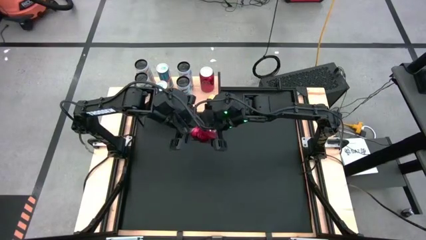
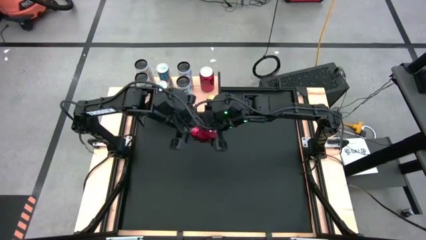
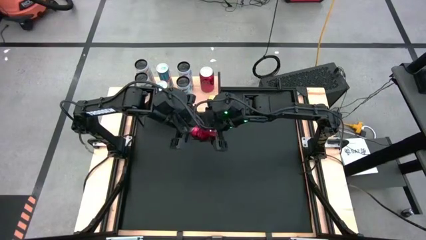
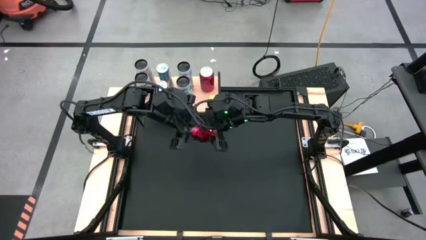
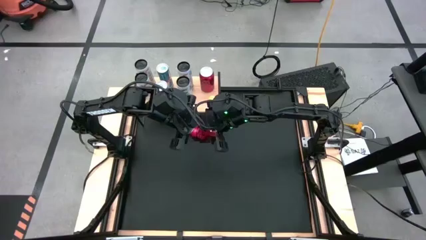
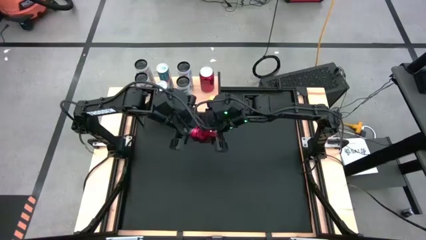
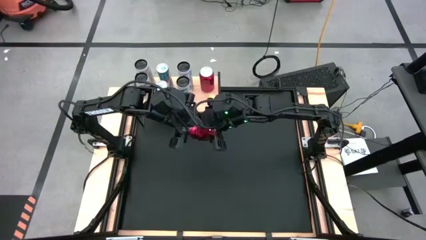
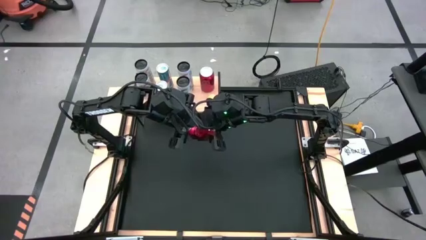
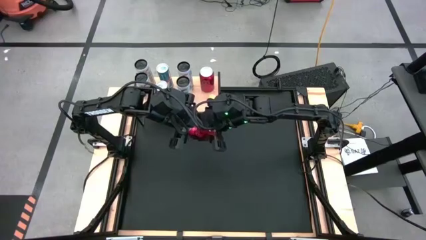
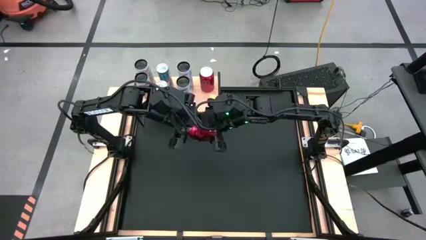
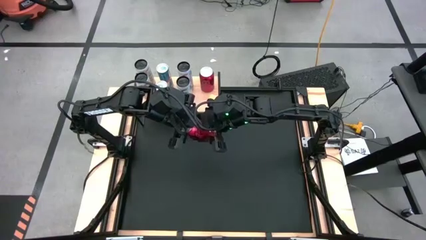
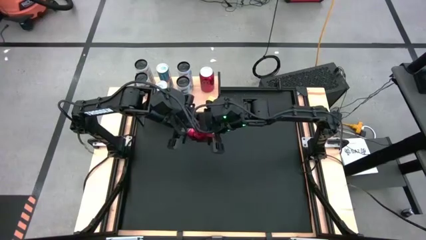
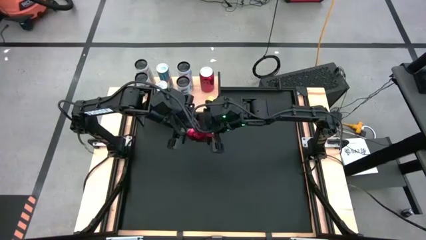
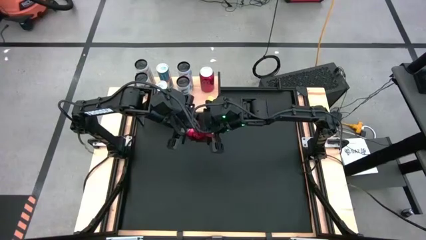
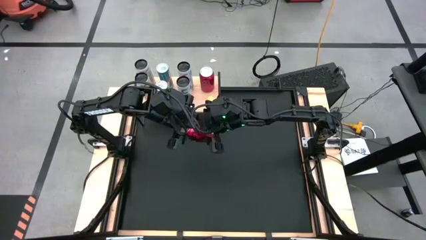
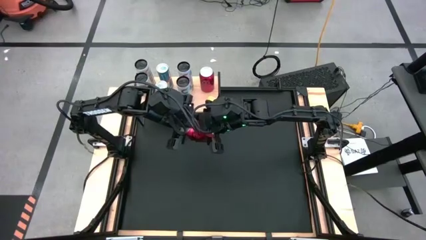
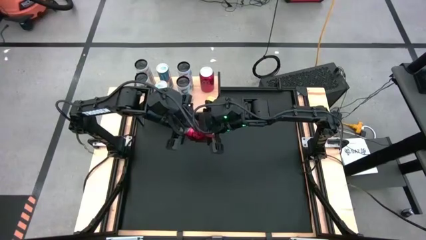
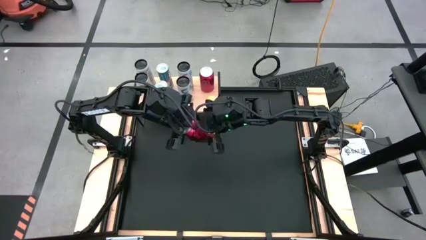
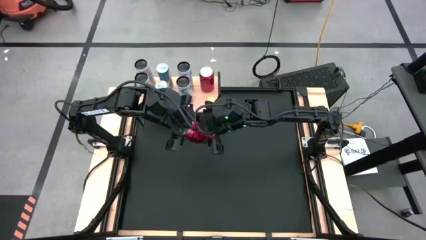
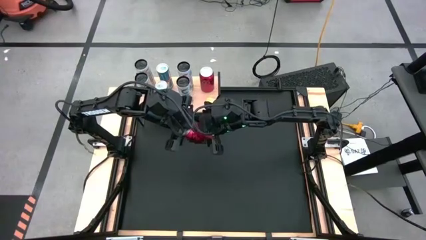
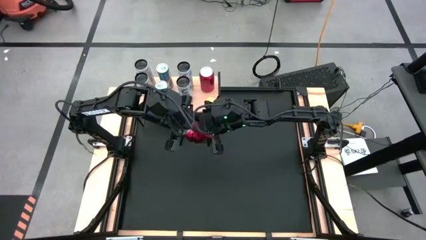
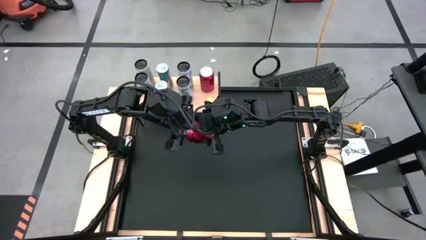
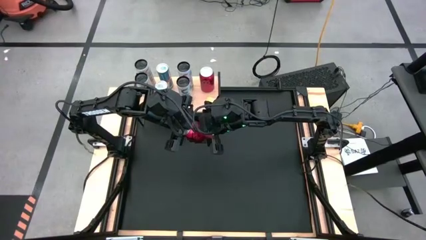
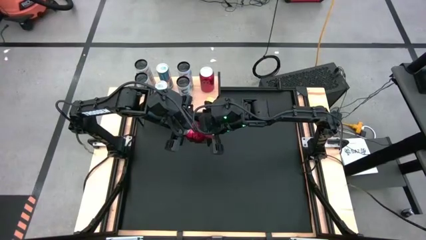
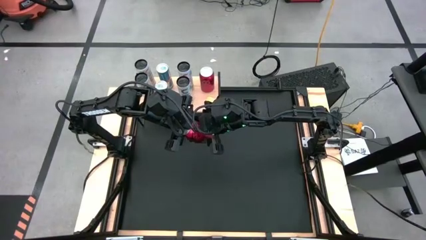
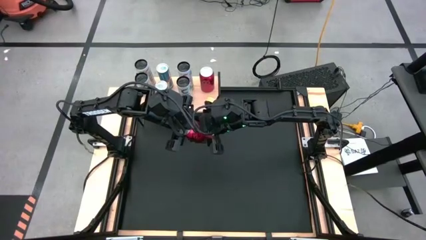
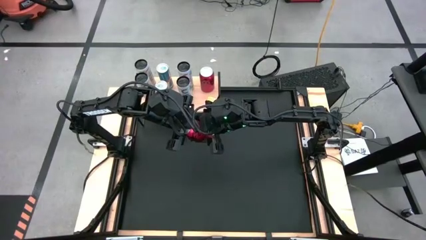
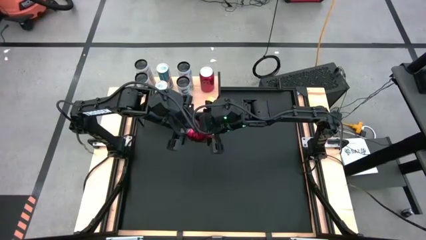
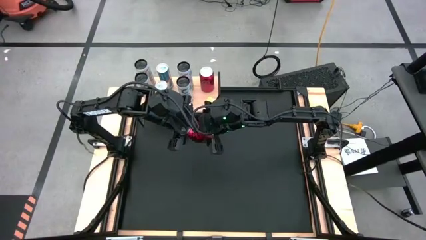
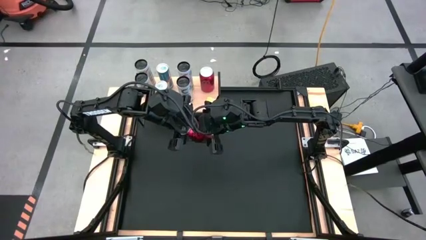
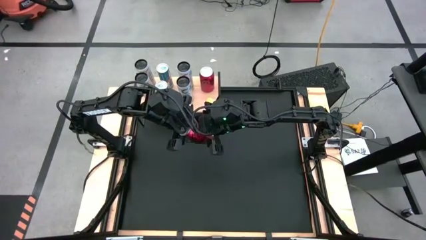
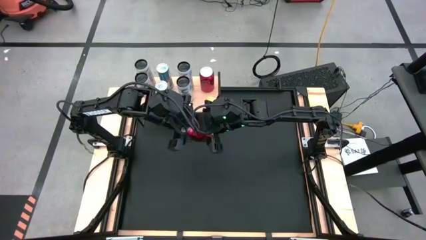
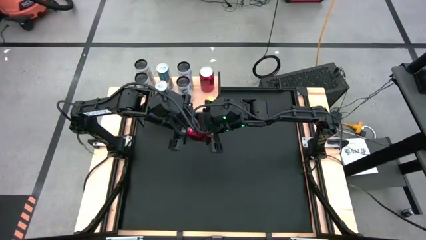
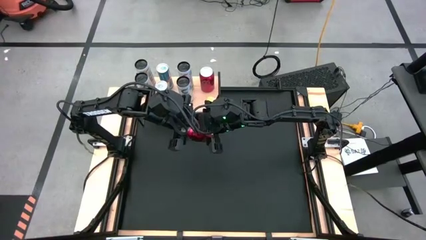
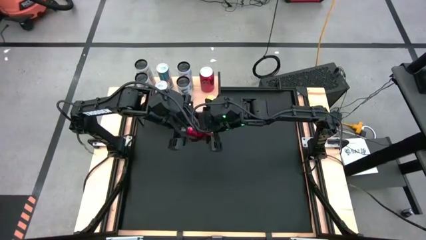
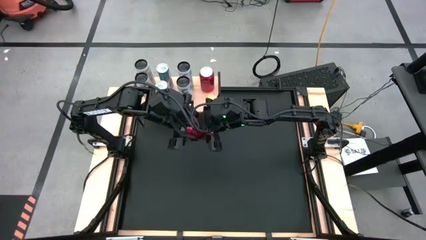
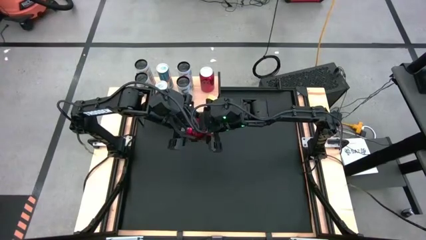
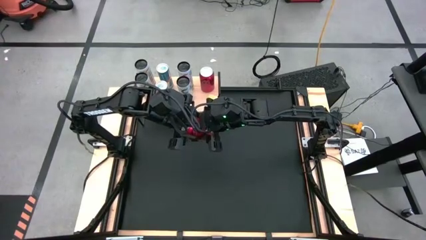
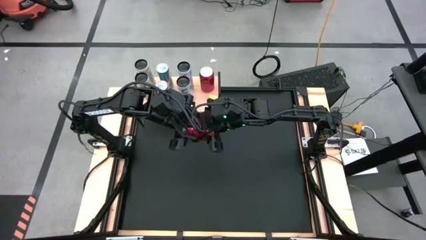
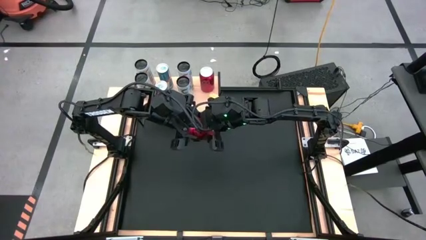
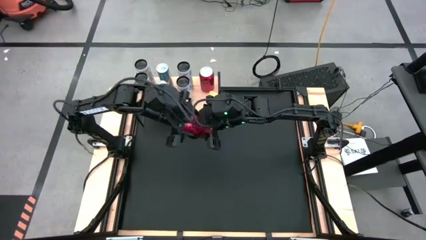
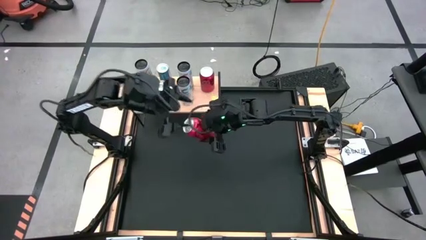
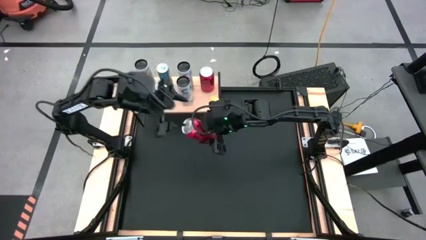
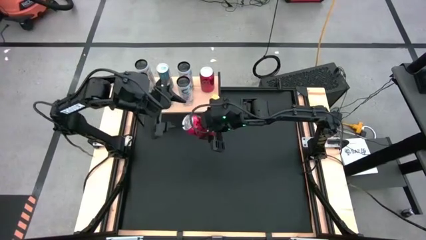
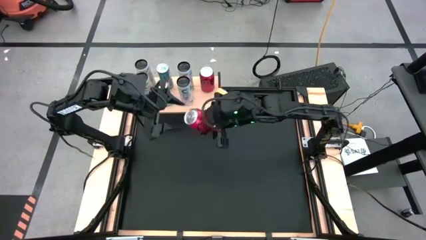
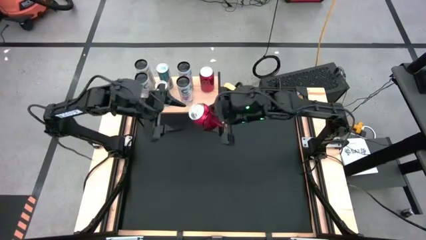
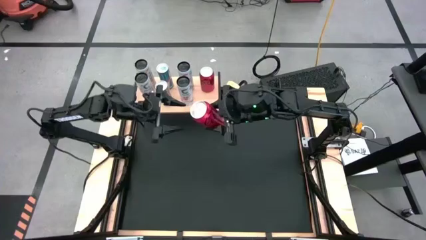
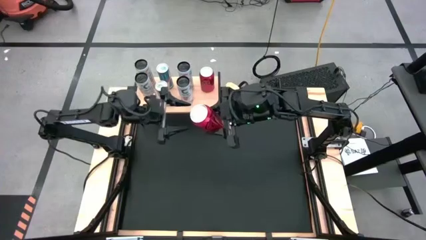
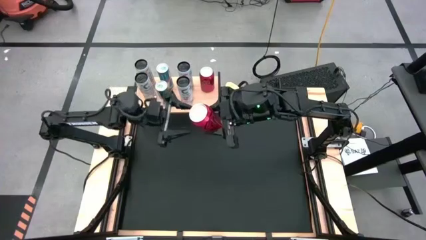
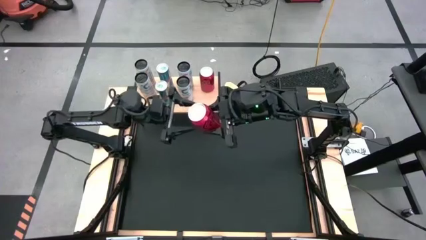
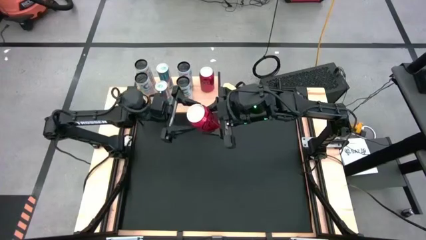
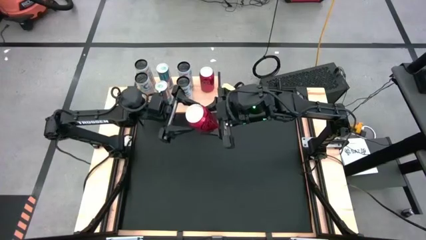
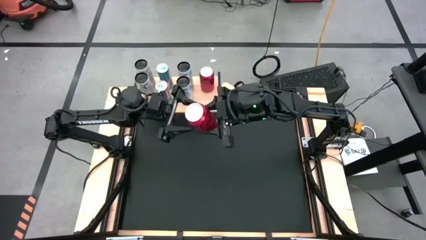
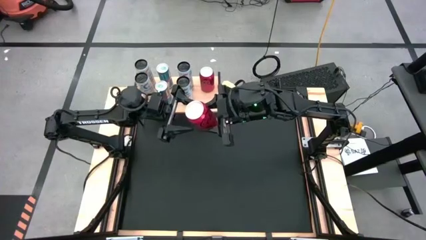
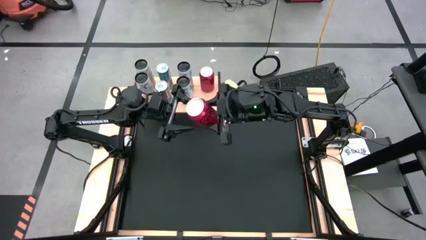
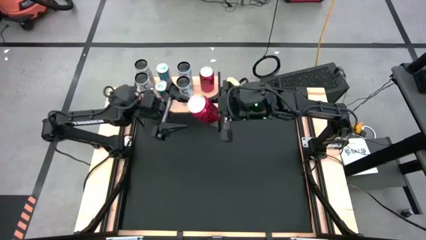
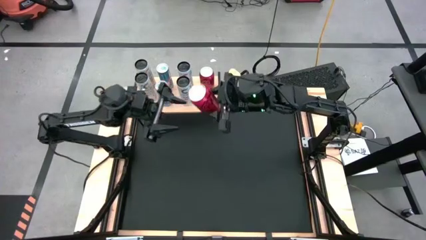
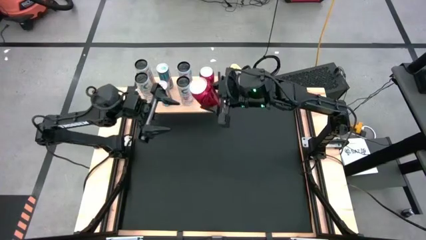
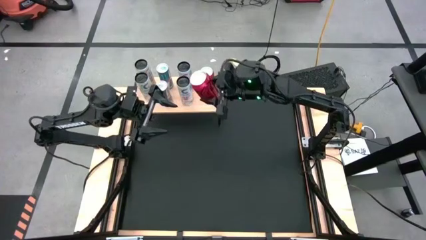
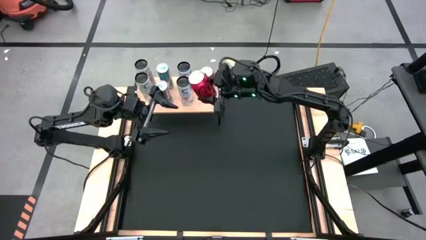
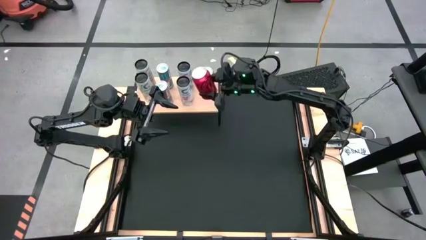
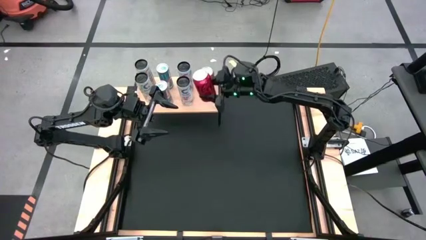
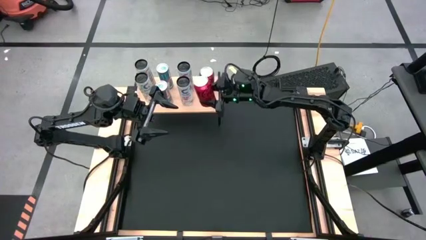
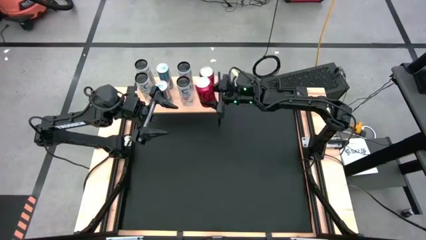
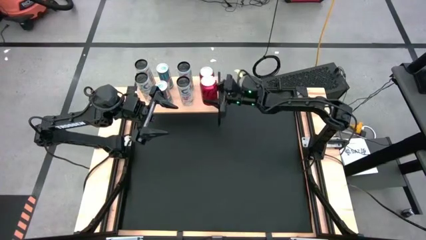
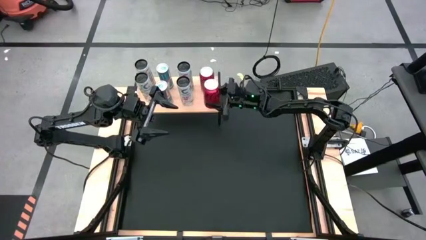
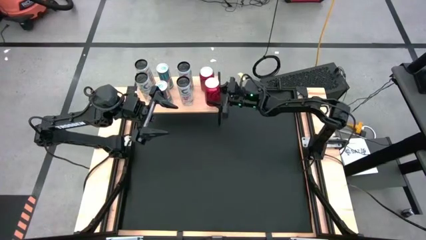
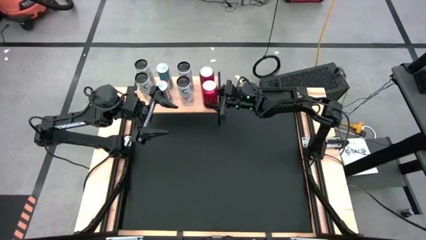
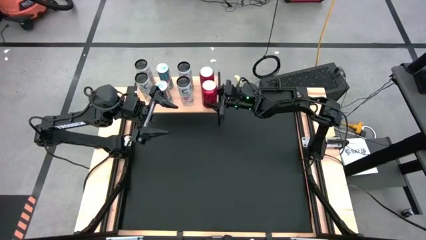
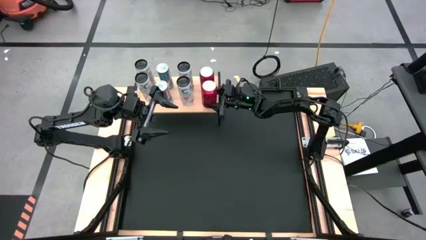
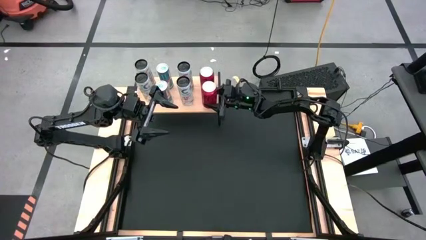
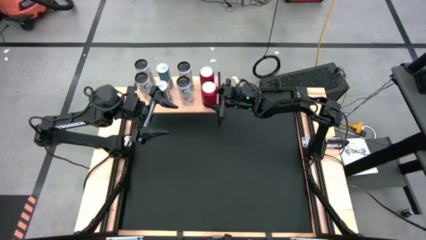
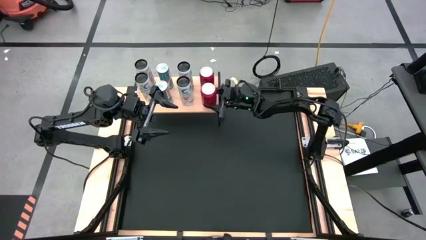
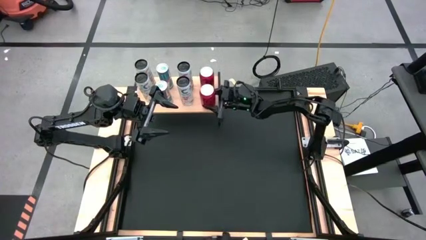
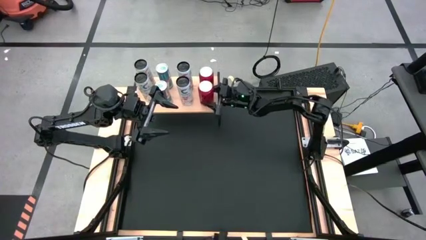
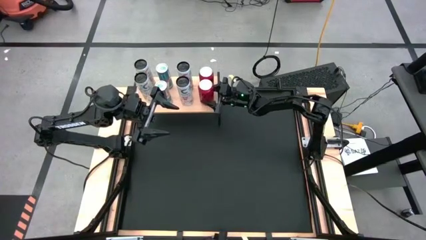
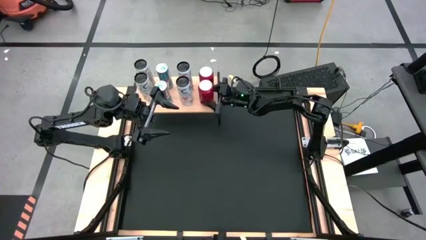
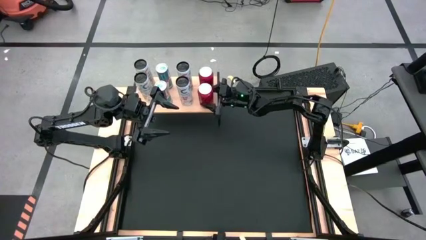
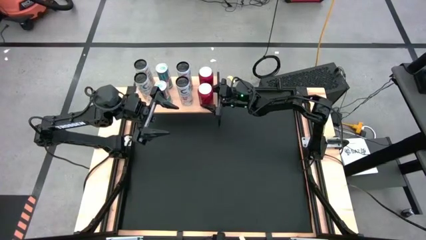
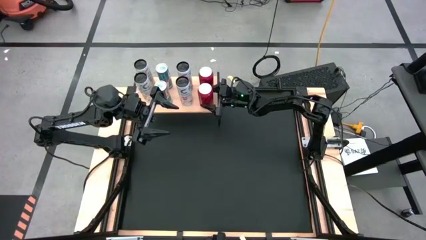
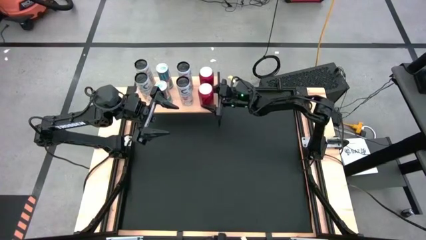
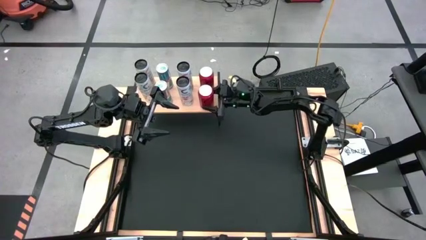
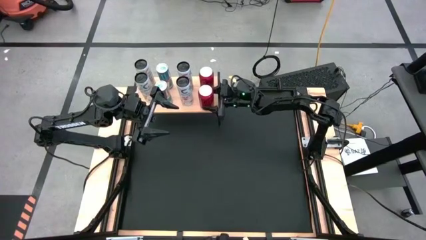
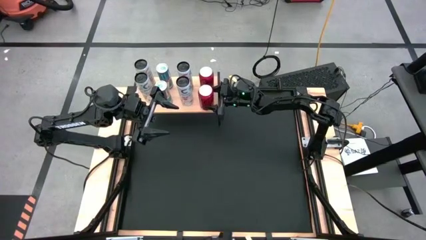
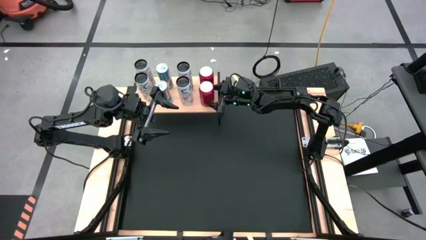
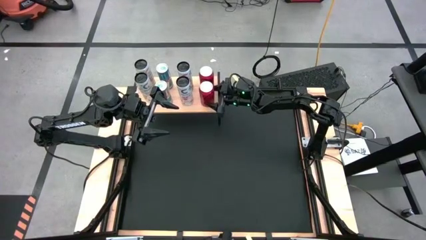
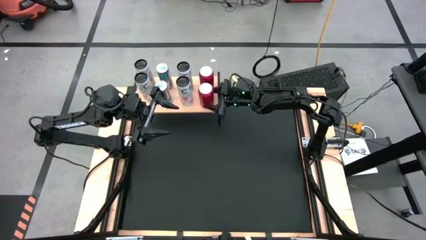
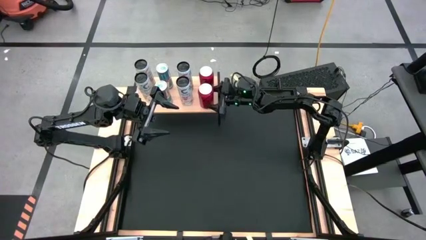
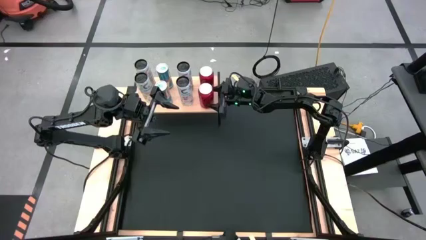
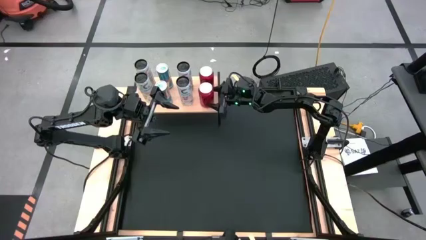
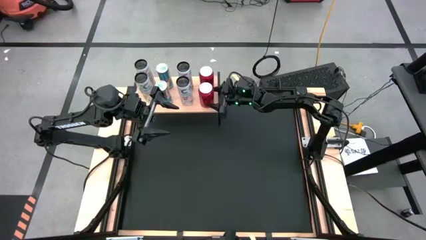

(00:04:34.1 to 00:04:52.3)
Task: Place canned beverage on shelf
Put the red black soda can on the shelf aligned with the red black soda can
